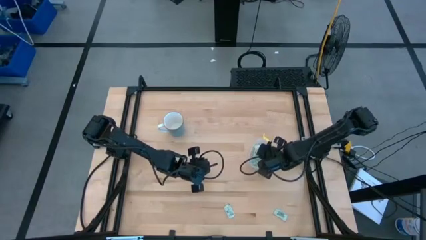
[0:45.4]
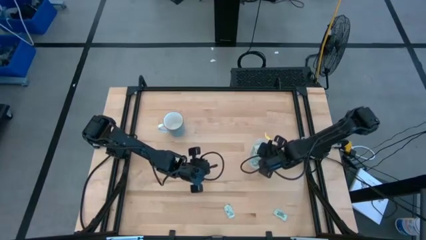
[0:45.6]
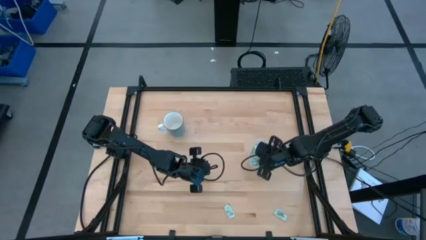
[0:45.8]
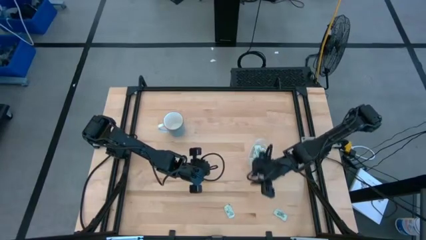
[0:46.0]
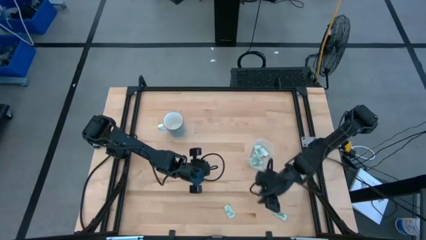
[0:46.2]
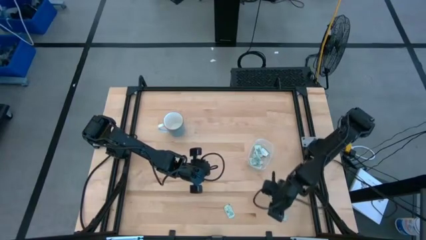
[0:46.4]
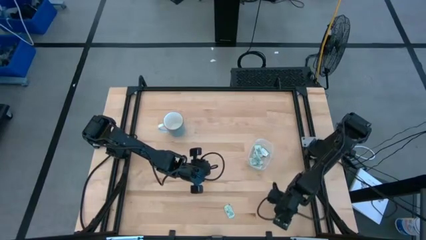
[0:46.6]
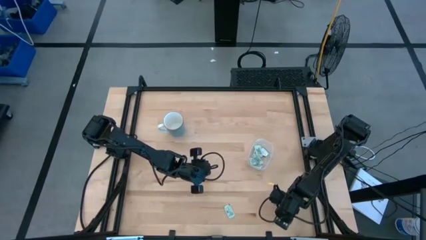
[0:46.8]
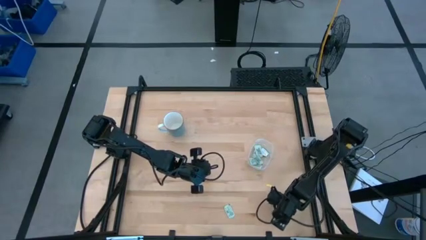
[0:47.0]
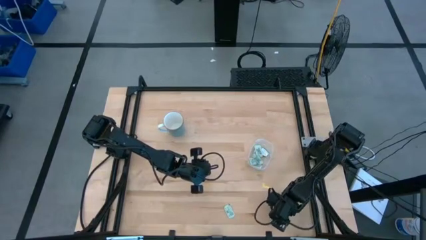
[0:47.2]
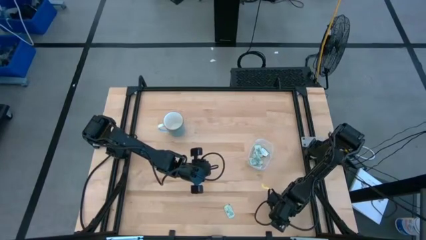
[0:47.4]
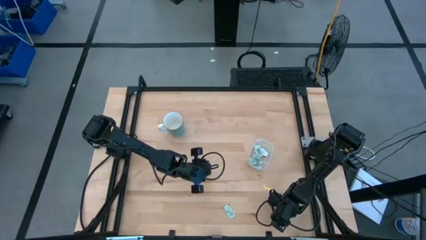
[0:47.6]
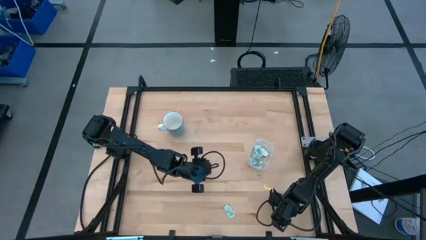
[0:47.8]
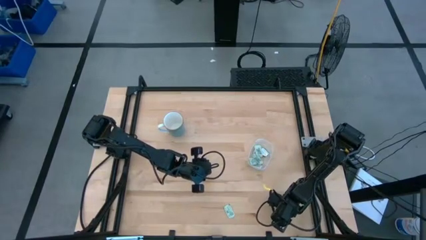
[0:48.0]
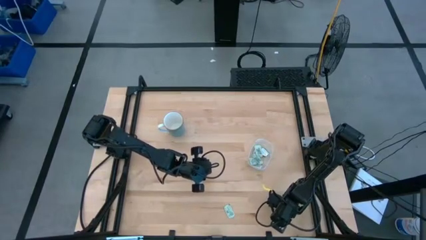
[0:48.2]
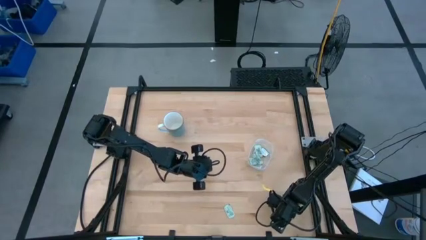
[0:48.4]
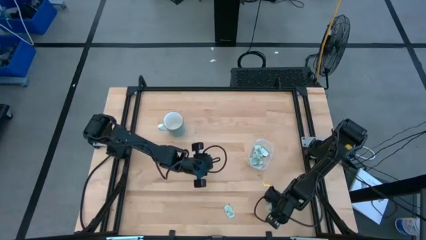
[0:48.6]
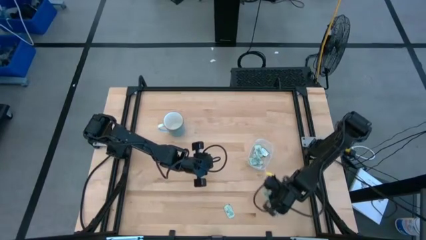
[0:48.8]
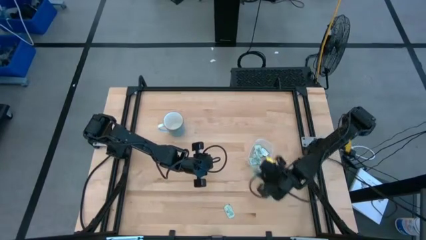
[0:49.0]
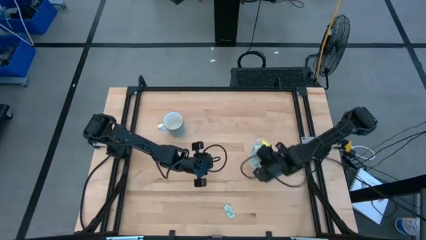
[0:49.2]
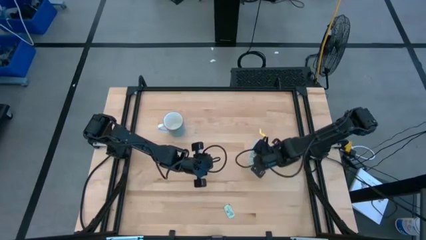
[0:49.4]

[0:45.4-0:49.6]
Task: Pick and place Stevia / Truvia into bins
Put the right stevia packet into the container

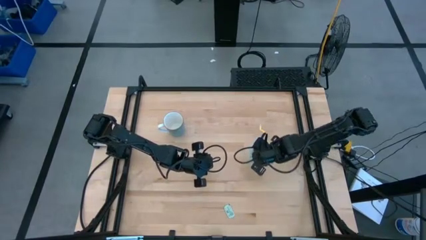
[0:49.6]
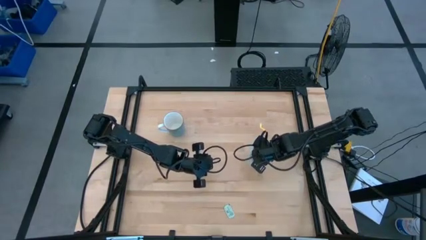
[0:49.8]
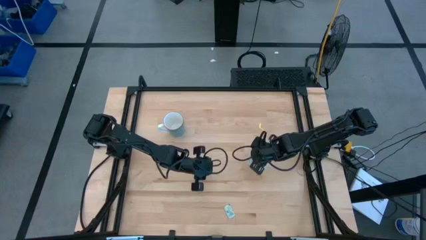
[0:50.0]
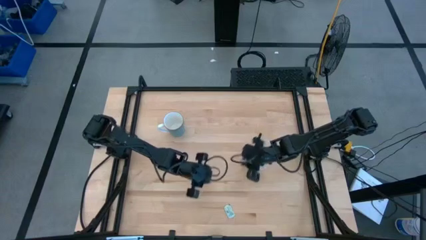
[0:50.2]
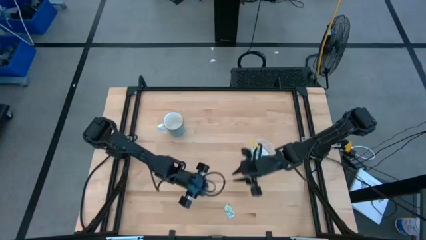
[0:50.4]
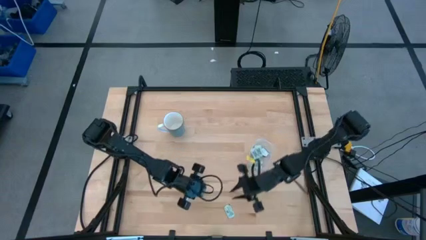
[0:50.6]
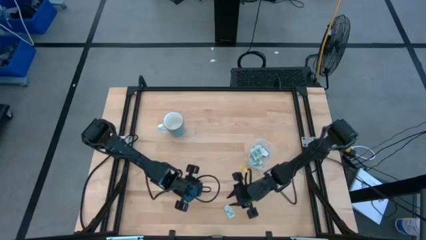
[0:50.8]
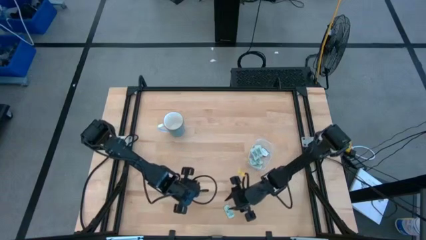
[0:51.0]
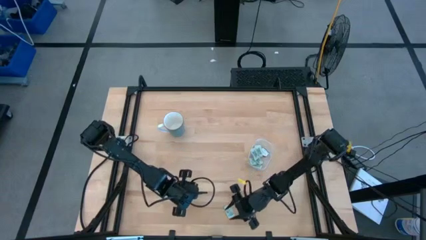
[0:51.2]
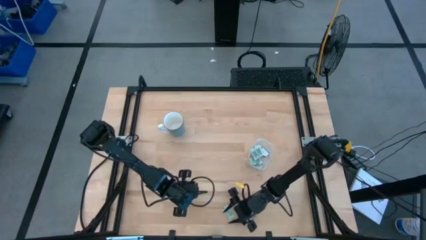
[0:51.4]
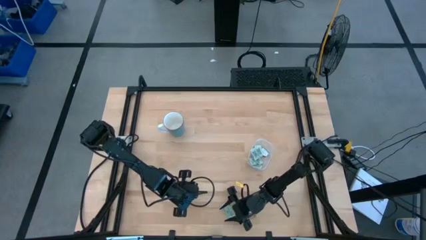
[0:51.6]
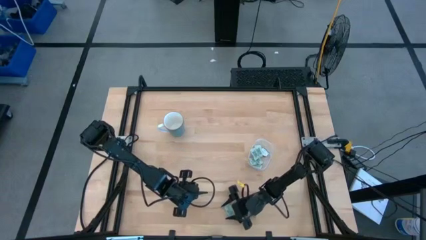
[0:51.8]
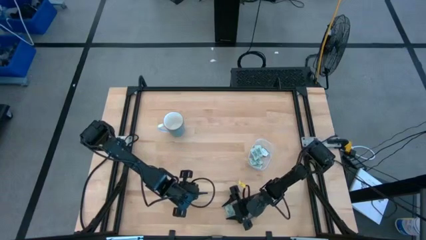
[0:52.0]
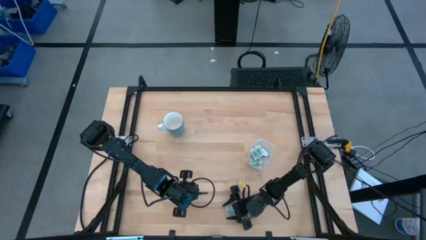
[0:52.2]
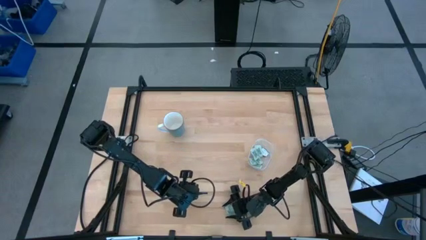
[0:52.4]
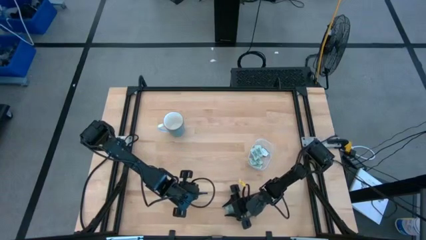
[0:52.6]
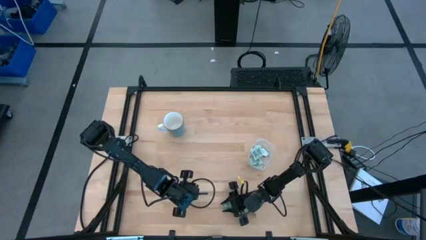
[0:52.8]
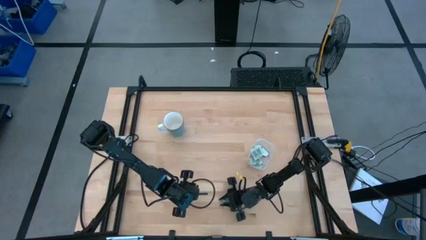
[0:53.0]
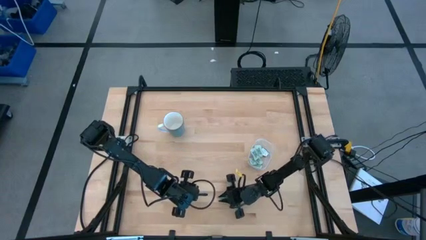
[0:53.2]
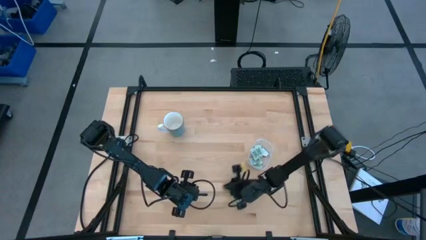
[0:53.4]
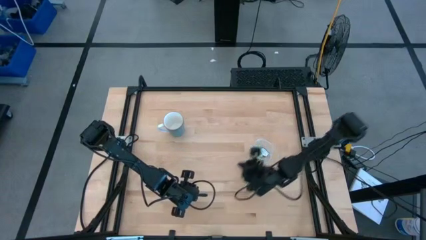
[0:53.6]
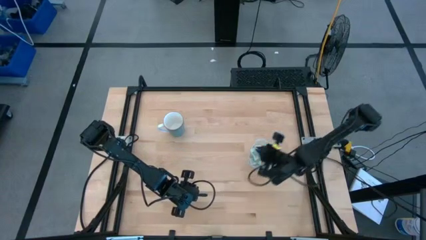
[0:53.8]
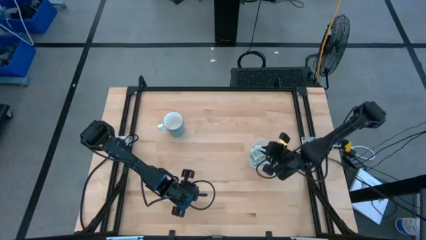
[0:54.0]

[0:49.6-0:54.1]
Put the stevia packet into the container

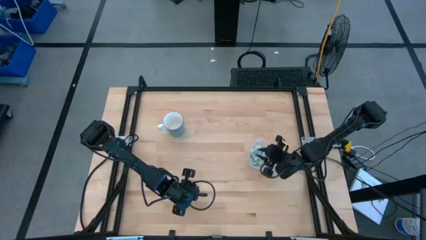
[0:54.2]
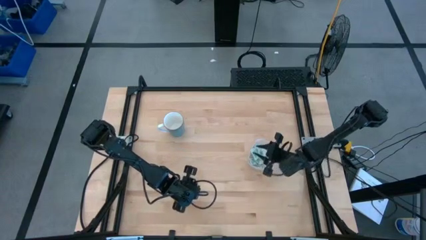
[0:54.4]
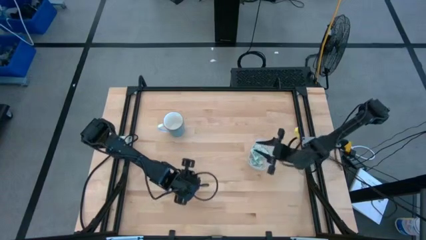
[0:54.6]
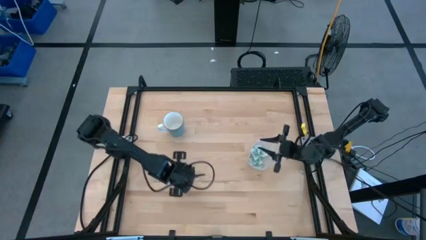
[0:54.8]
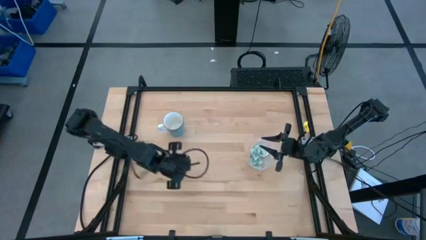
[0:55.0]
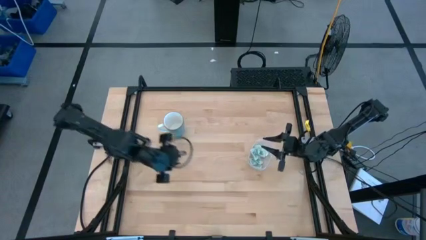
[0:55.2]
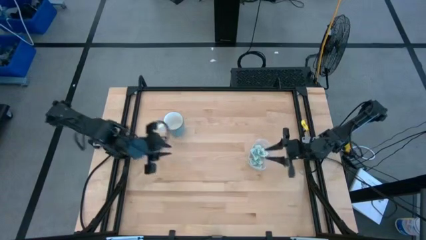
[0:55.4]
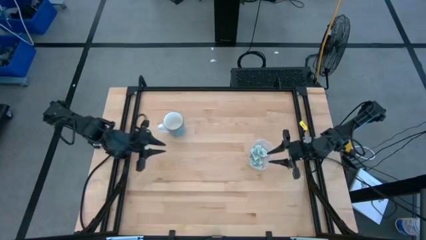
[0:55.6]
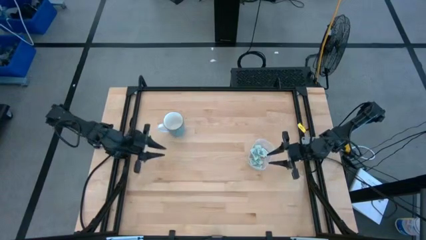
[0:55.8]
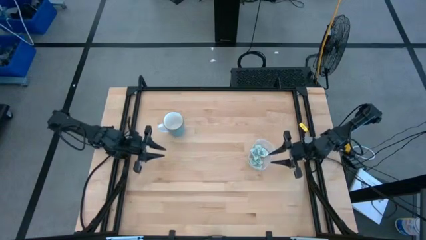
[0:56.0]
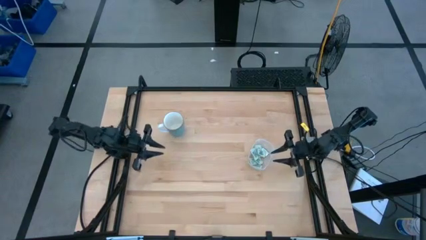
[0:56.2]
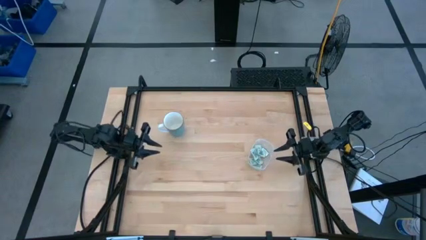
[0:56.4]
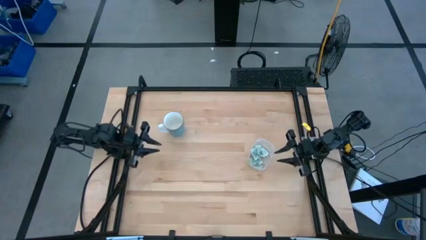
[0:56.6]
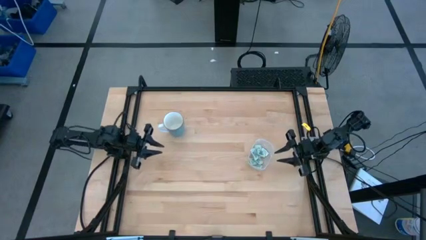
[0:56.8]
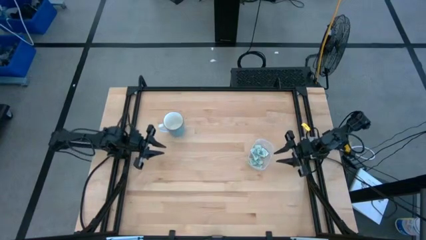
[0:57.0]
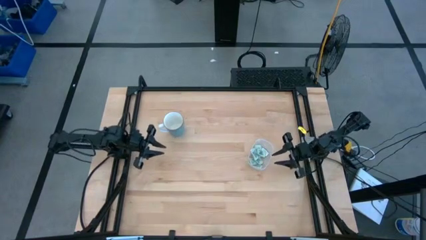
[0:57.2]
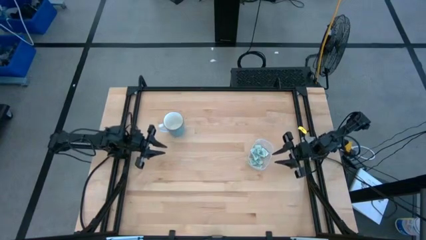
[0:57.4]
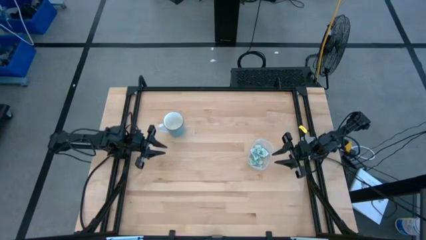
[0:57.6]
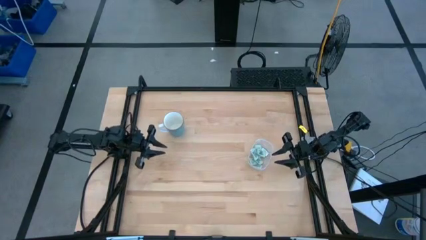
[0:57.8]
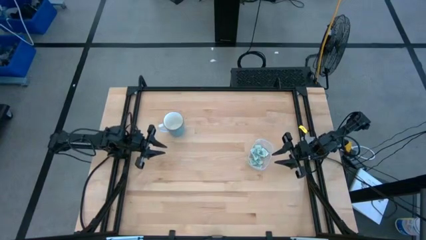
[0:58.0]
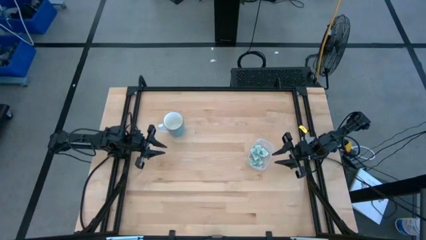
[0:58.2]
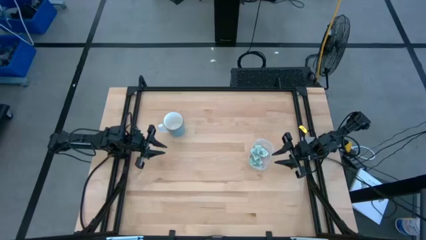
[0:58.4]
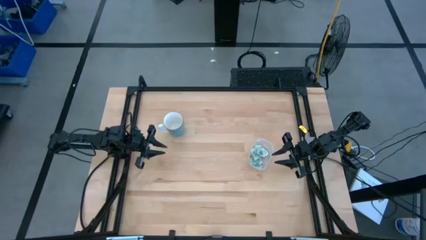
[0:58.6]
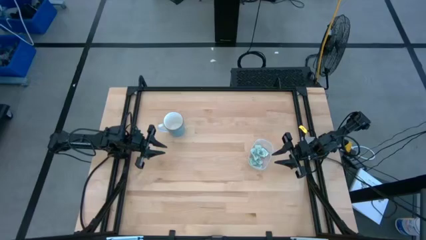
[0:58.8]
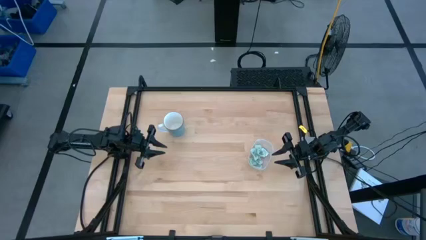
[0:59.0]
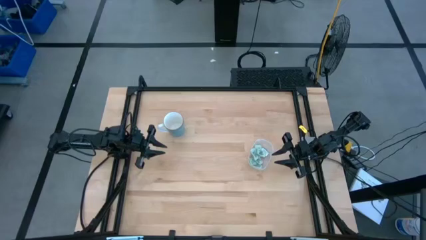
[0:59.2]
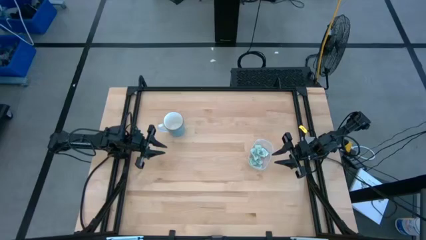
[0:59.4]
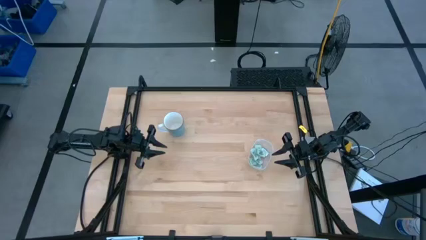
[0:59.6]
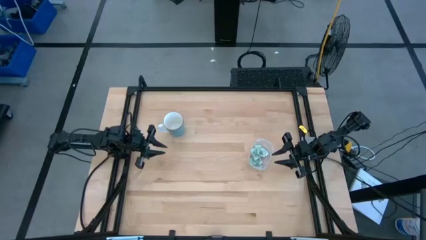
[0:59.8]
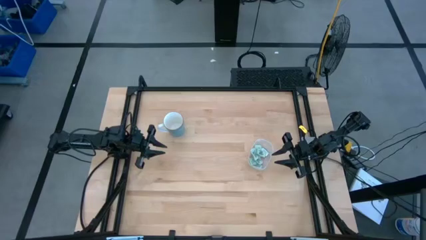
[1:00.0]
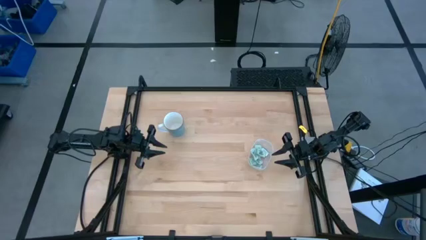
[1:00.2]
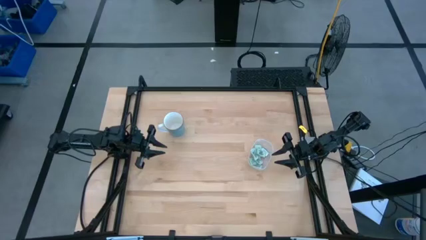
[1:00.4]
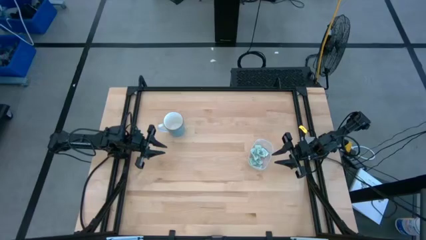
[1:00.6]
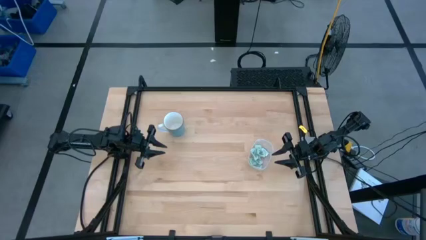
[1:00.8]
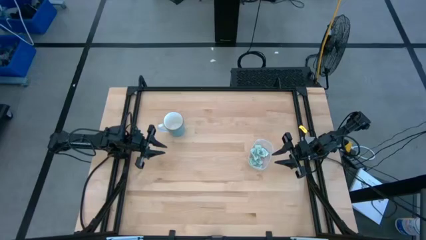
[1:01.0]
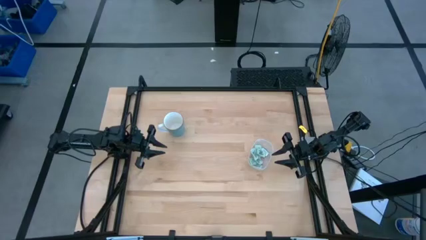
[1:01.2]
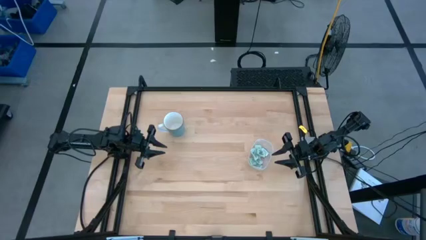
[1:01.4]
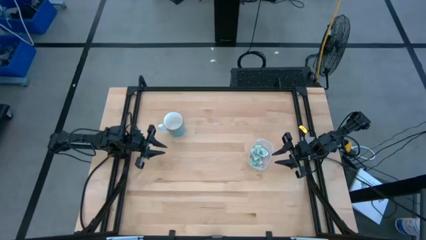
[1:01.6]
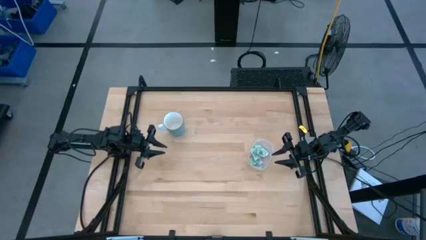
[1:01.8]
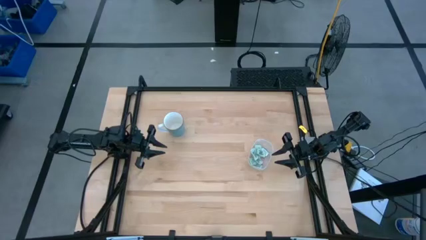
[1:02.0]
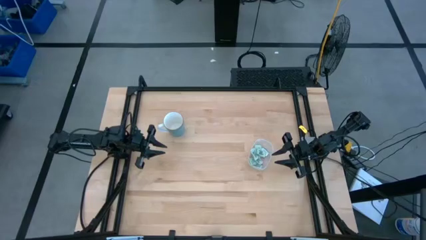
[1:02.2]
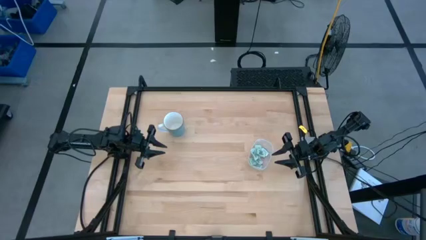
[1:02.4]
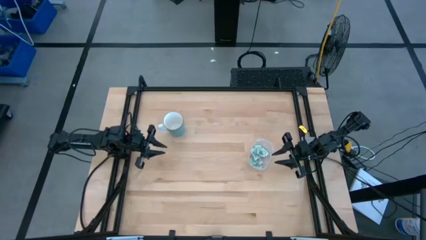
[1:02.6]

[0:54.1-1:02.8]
Return to Home Position
